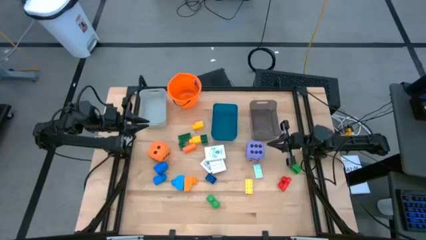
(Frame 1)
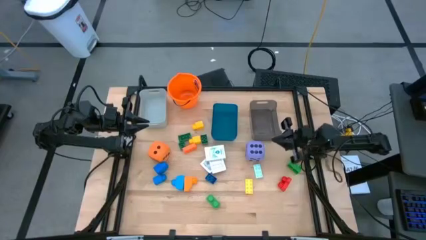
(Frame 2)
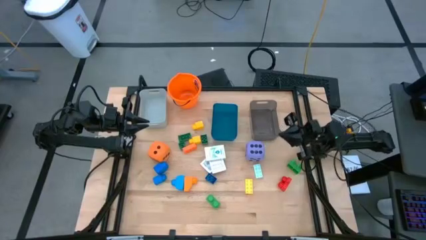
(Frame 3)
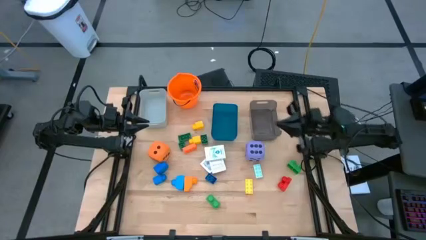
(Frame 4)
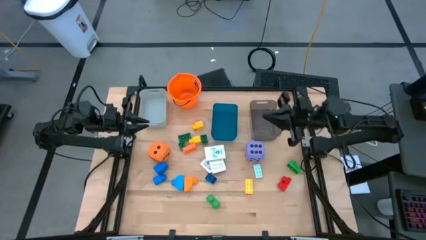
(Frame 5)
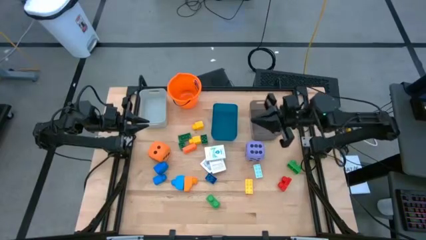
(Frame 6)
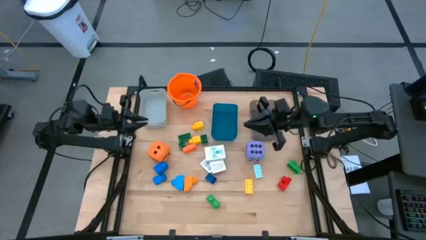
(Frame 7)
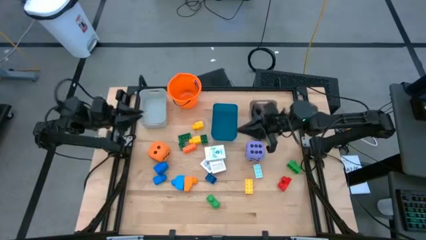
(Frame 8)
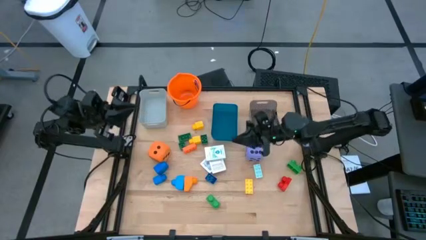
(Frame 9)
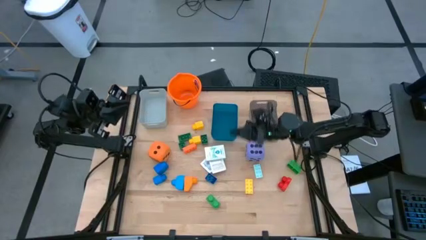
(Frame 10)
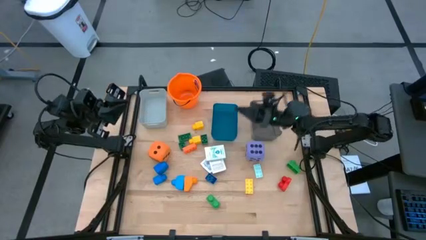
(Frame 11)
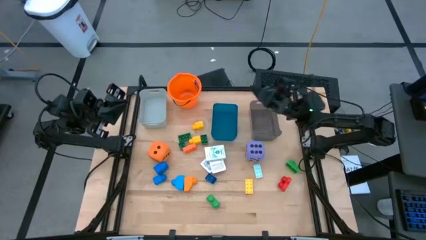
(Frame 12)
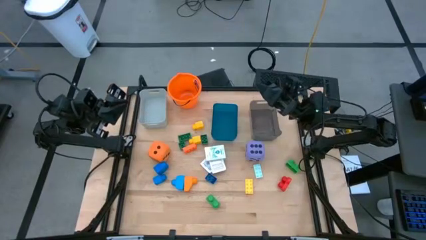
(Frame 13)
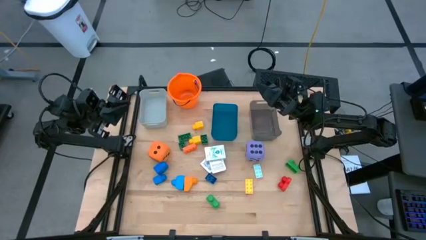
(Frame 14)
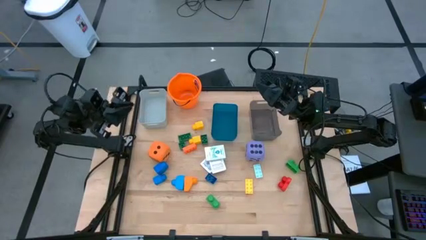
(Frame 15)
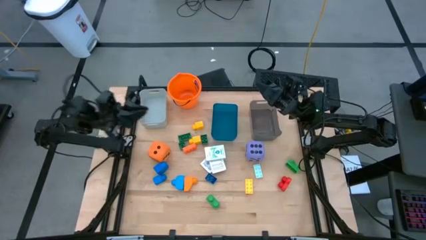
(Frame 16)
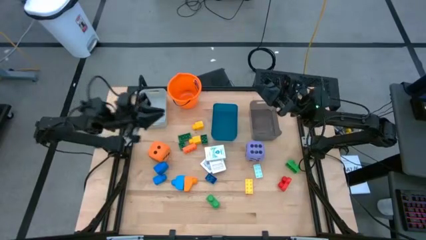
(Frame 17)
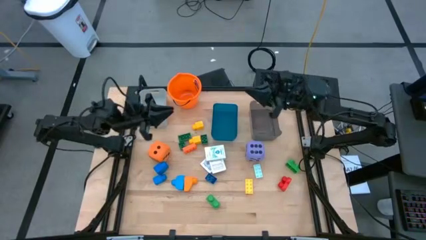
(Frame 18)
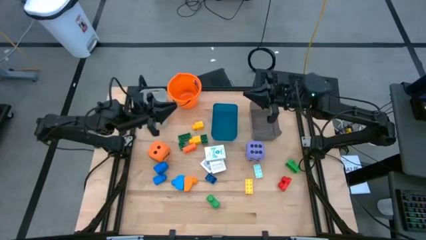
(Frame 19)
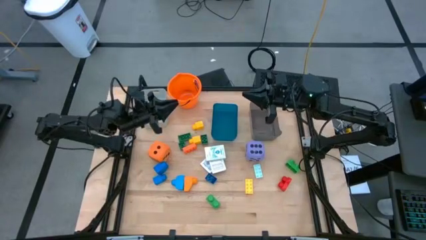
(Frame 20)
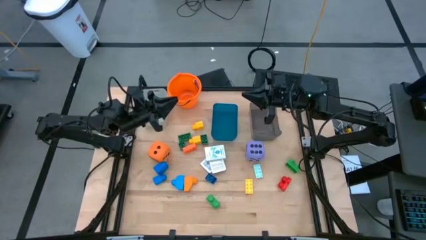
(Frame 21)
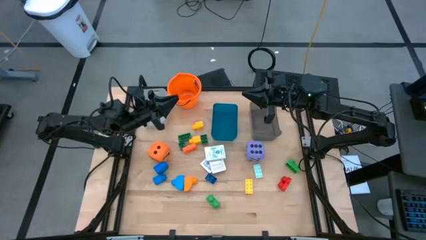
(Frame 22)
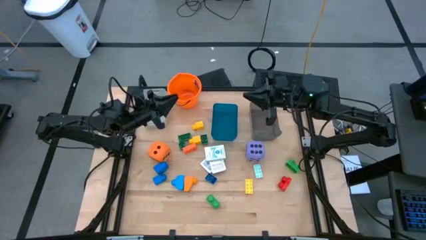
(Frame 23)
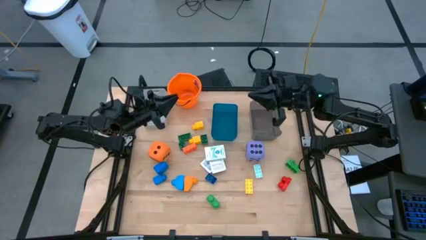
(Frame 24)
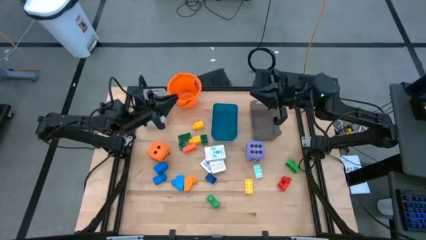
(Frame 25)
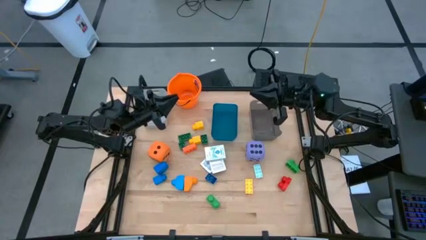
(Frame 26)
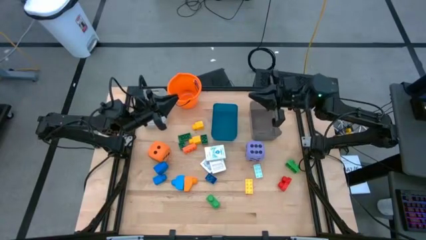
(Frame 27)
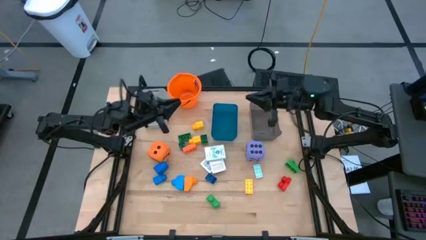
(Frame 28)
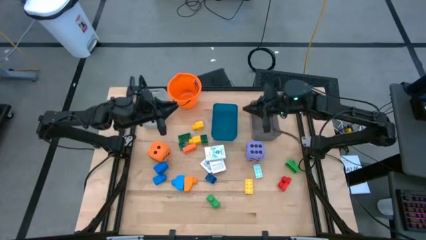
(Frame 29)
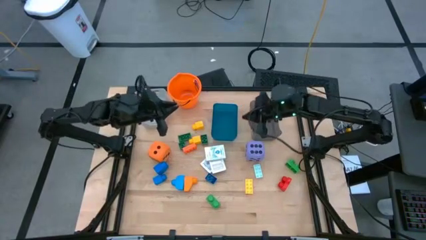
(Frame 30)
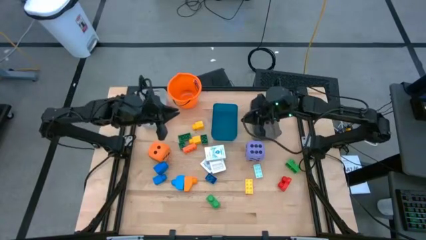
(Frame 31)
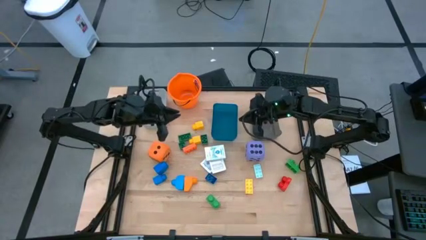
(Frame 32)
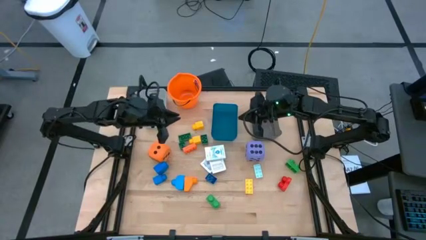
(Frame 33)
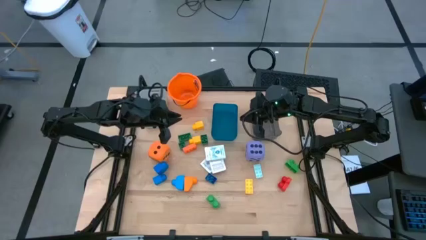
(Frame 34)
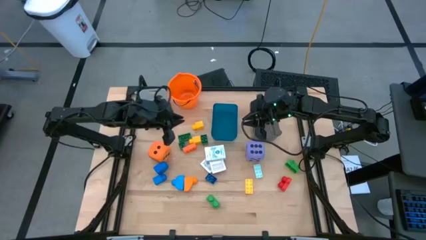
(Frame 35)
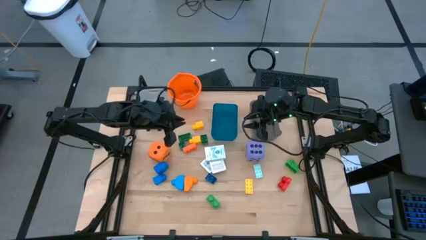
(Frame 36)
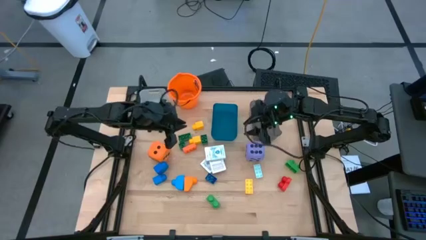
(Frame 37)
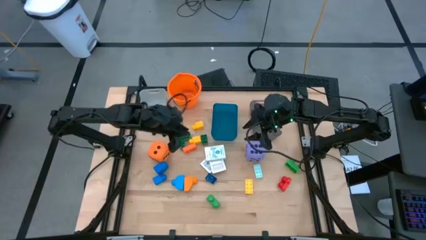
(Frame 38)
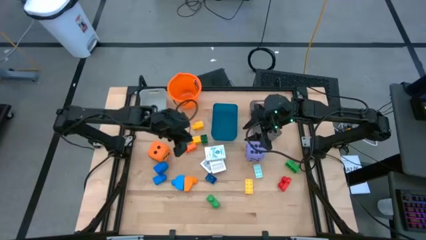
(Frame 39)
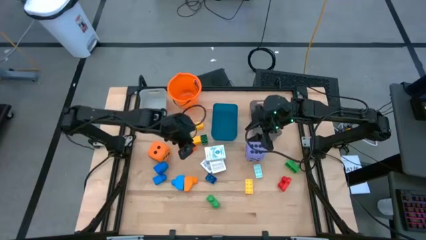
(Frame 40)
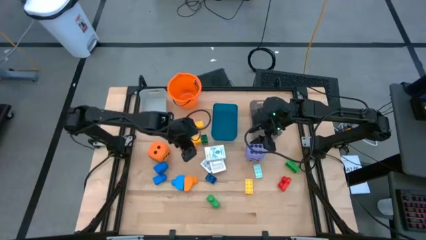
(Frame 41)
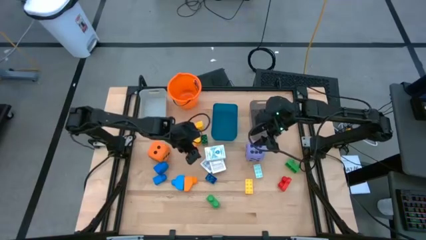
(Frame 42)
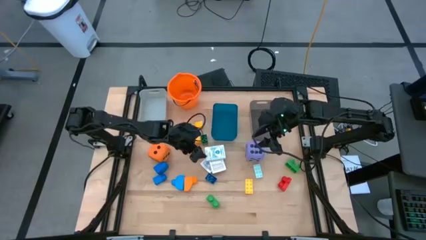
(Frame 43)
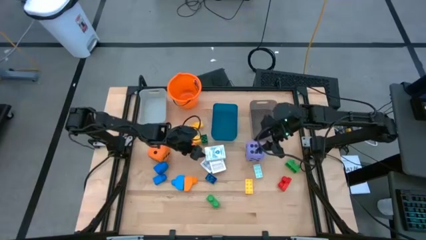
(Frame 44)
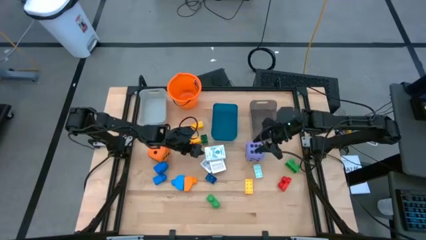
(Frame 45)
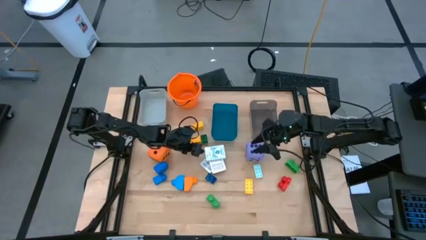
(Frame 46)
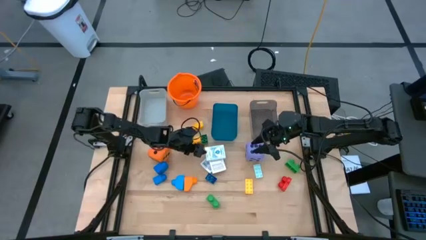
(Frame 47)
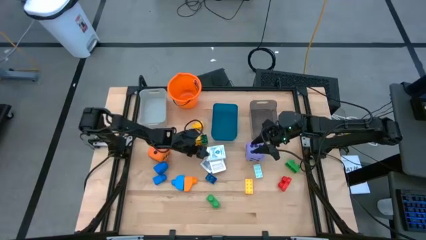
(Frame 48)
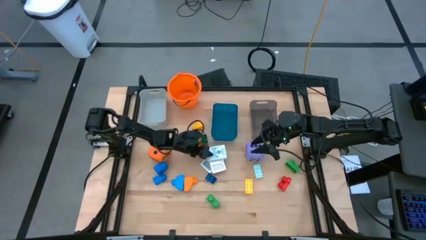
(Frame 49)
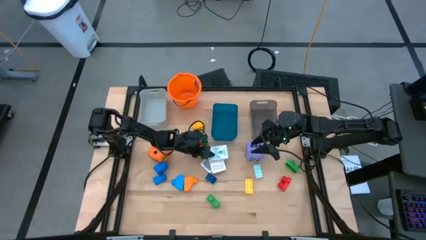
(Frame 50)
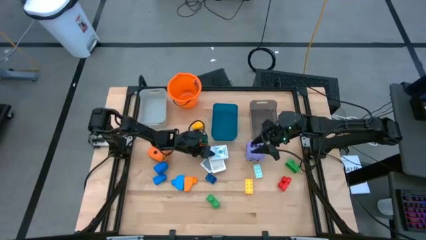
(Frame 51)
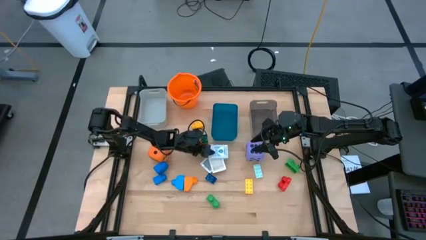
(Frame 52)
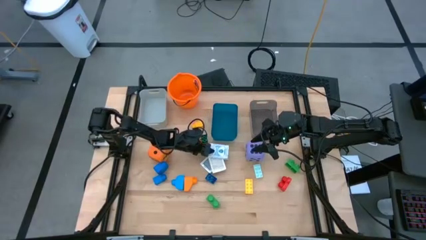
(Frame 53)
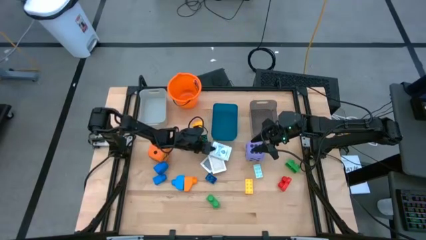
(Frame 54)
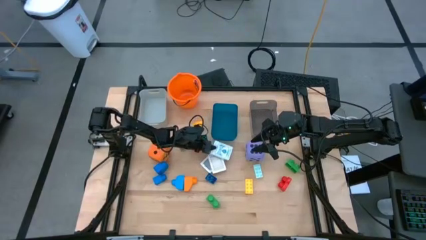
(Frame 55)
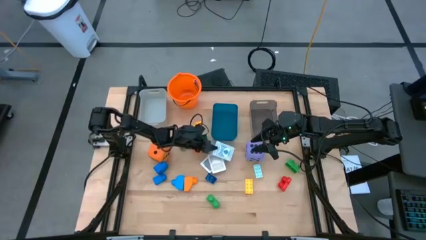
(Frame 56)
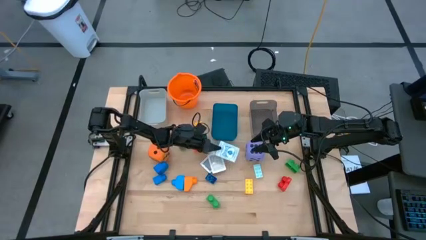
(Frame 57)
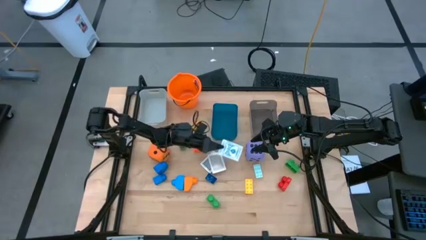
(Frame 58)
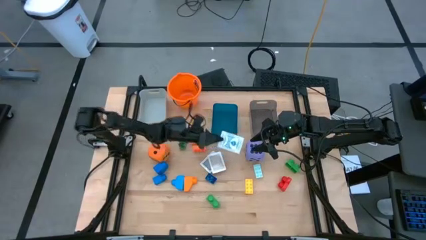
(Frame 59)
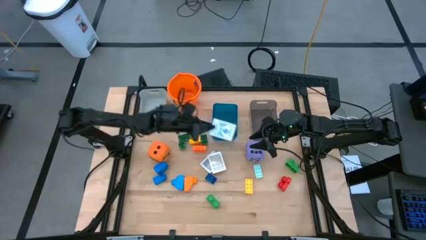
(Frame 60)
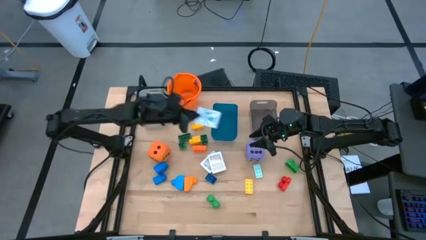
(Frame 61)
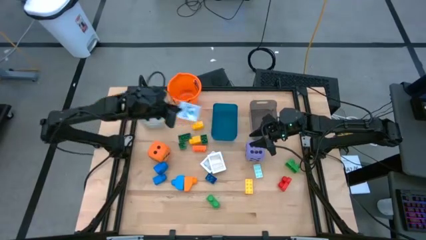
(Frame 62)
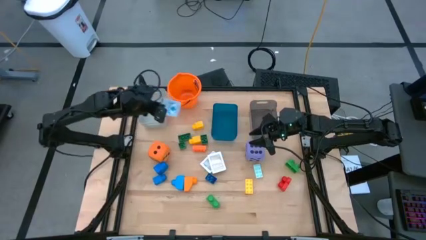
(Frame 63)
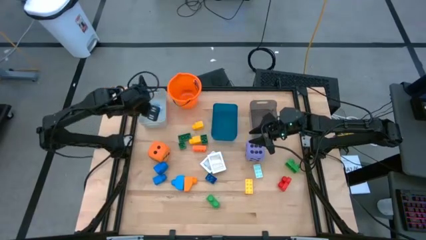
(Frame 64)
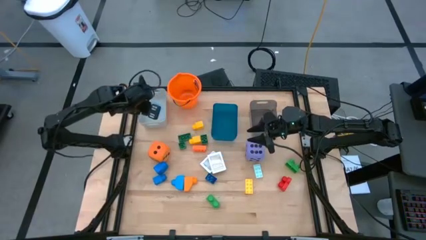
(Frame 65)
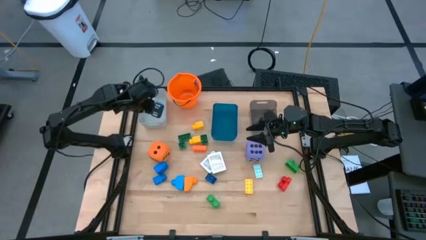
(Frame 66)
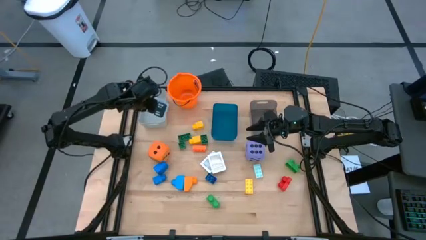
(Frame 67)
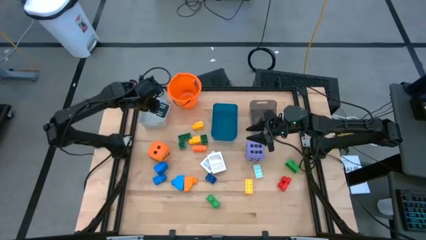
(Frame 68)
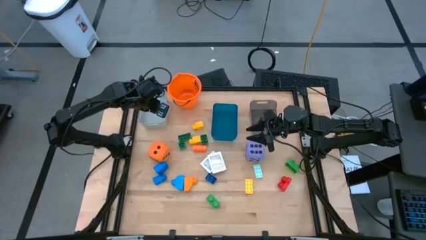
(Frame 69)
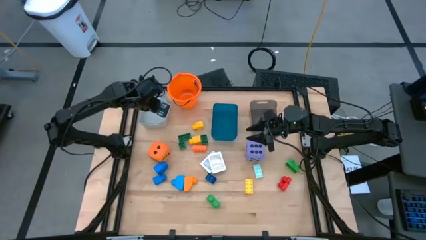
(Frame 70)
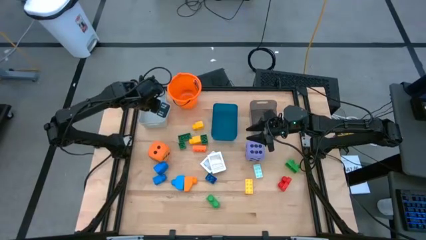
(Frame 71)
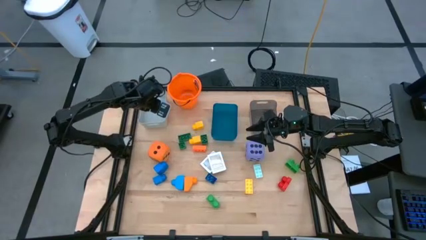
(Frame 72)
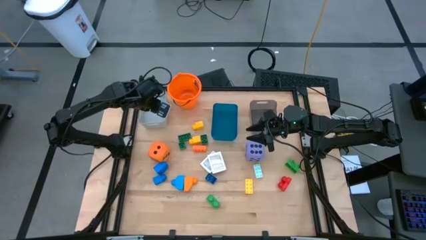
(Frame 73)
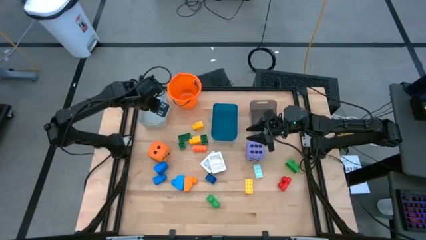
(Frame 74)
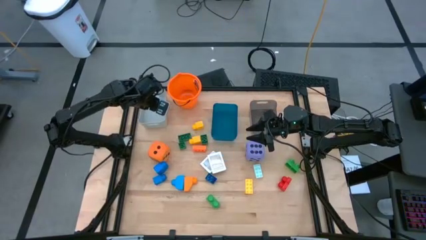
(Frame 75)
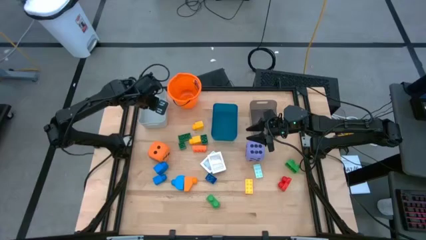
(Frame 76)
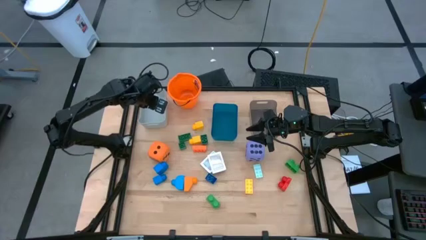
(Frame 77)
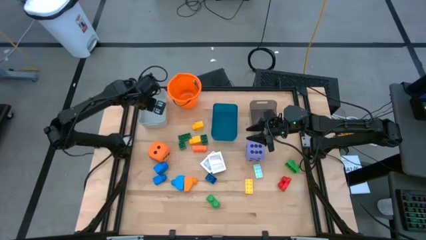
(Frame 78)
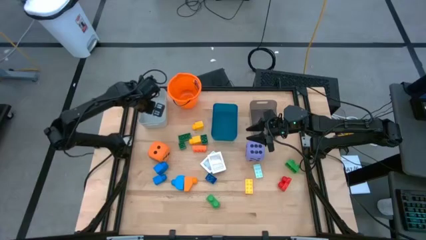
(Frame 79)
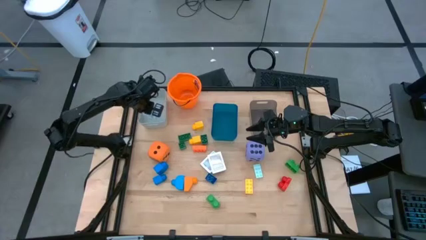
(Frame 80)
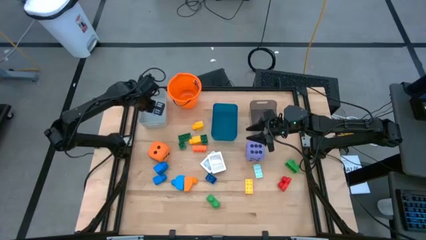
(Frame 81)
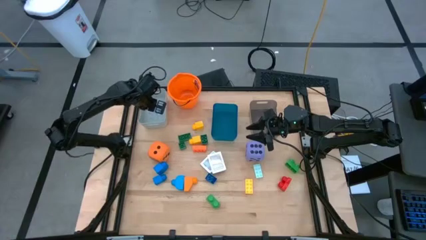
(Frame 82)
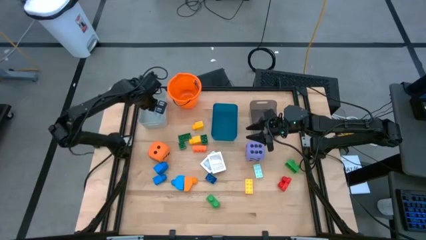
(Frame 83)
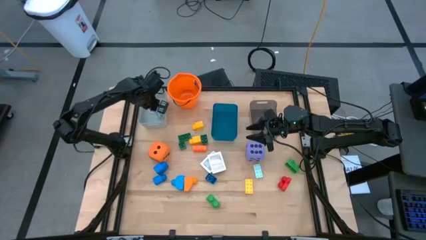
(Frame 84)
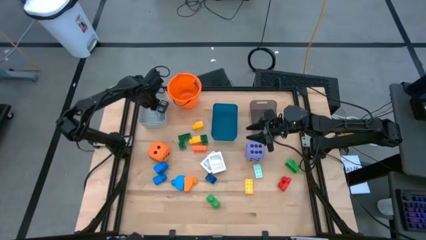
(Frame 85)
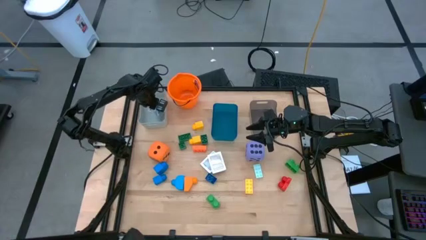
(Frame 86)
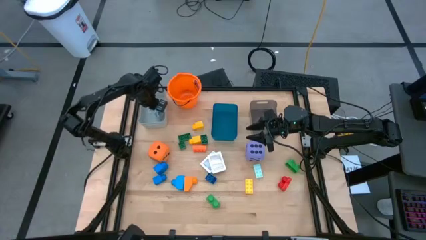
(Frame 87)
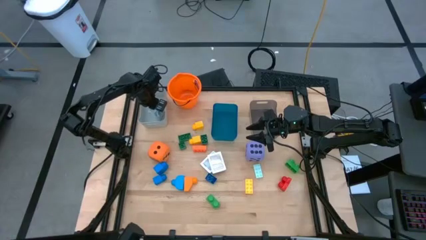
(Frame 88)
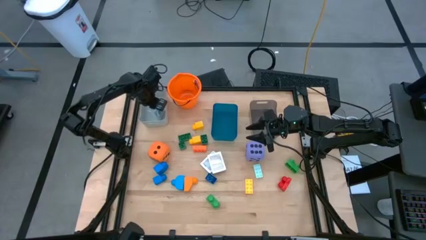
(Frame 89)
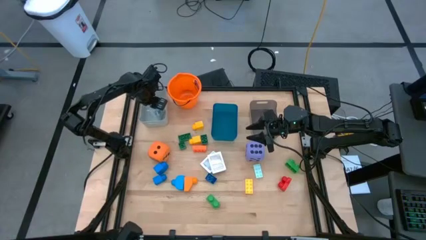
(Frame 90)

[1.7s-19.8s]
Task: Pick & Place Toys
Put the blue deck of cards into the gray bin
